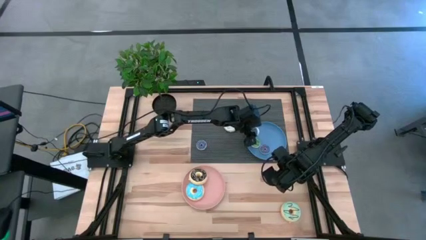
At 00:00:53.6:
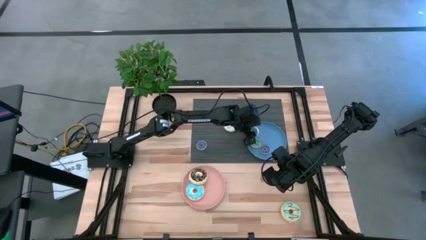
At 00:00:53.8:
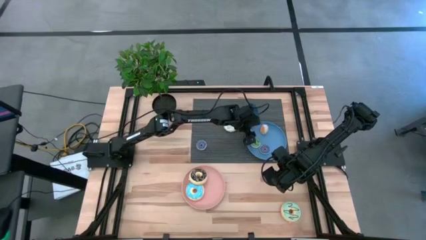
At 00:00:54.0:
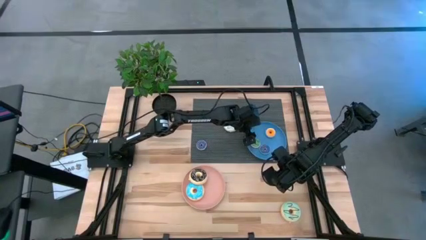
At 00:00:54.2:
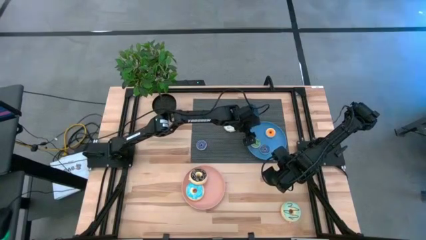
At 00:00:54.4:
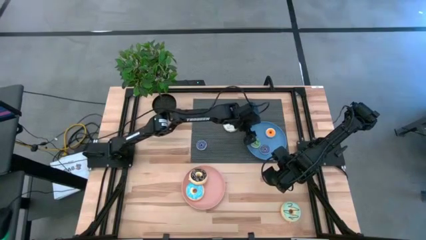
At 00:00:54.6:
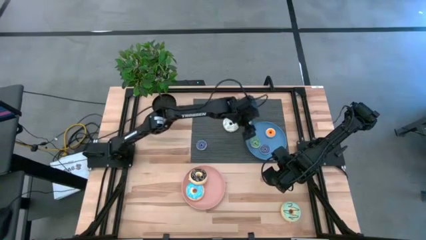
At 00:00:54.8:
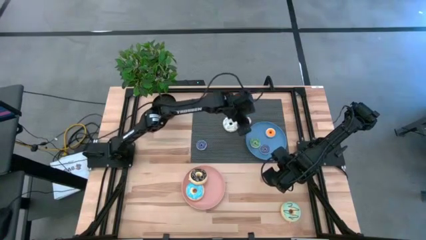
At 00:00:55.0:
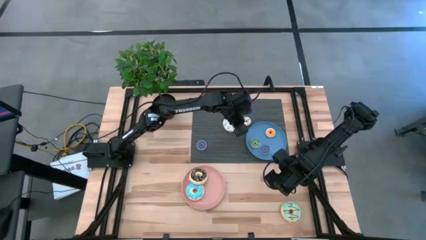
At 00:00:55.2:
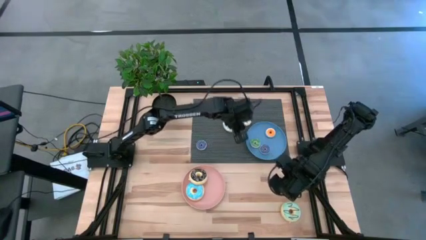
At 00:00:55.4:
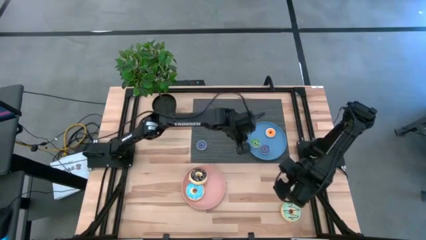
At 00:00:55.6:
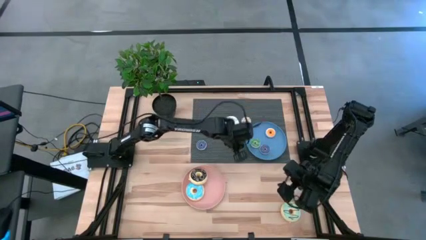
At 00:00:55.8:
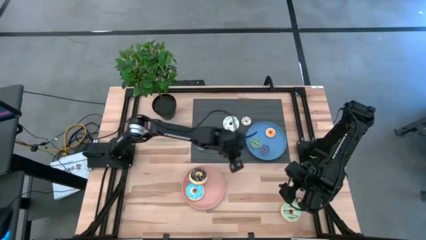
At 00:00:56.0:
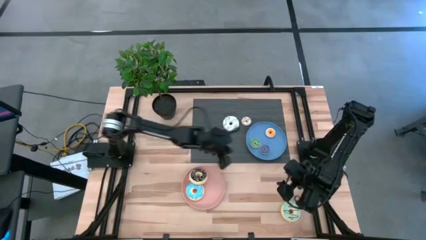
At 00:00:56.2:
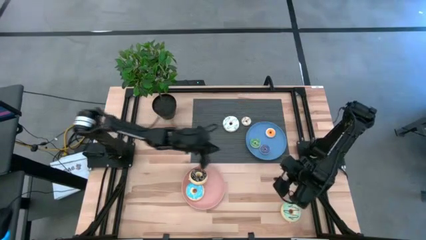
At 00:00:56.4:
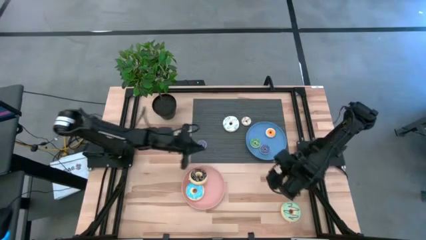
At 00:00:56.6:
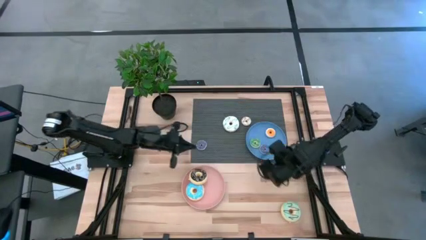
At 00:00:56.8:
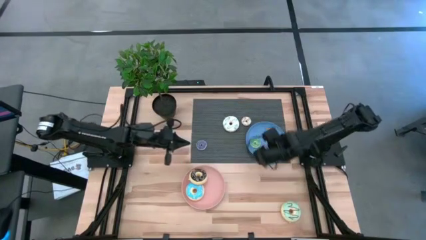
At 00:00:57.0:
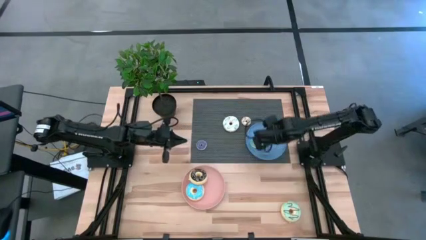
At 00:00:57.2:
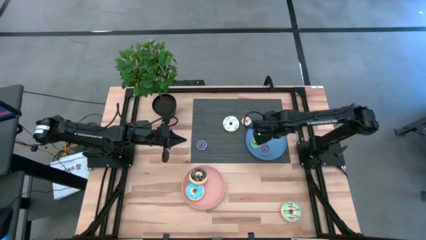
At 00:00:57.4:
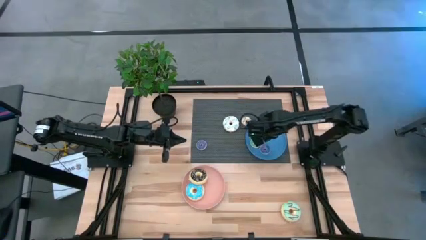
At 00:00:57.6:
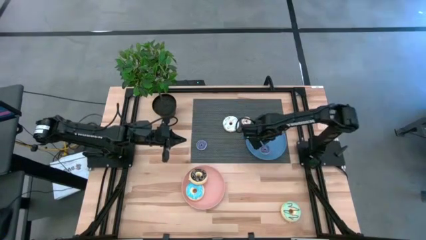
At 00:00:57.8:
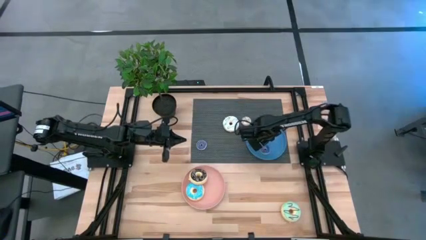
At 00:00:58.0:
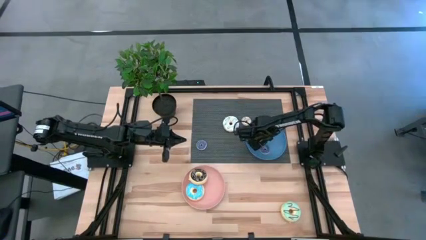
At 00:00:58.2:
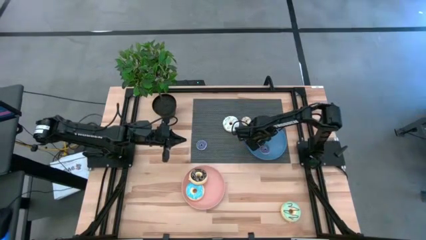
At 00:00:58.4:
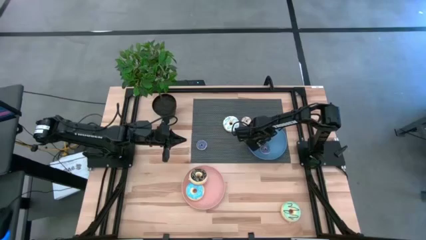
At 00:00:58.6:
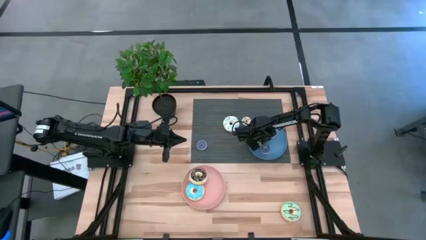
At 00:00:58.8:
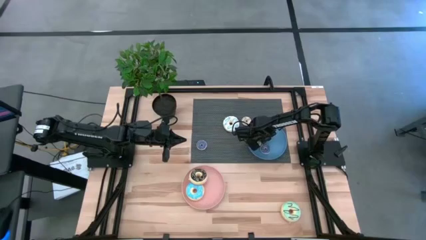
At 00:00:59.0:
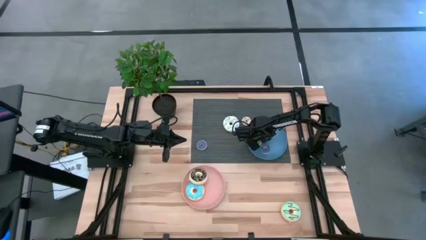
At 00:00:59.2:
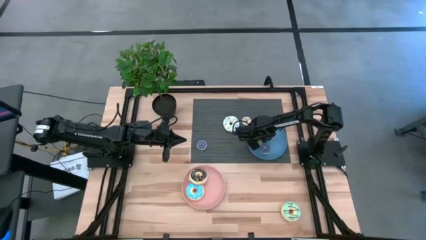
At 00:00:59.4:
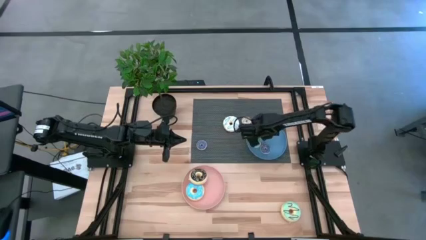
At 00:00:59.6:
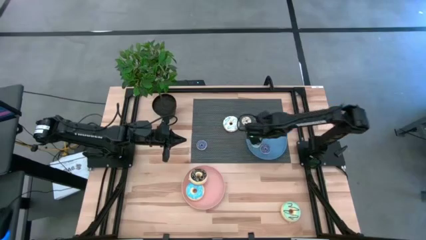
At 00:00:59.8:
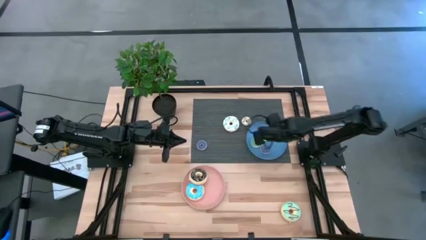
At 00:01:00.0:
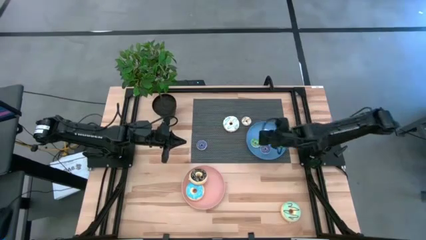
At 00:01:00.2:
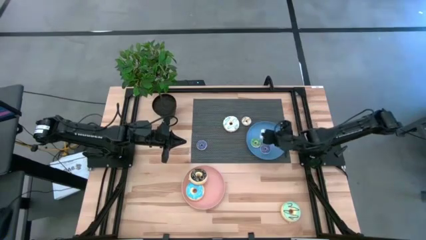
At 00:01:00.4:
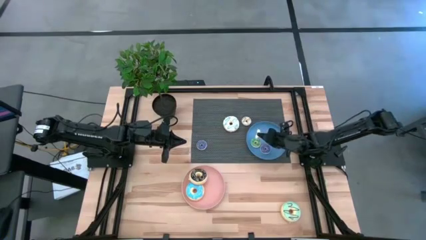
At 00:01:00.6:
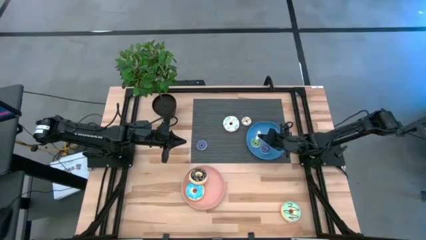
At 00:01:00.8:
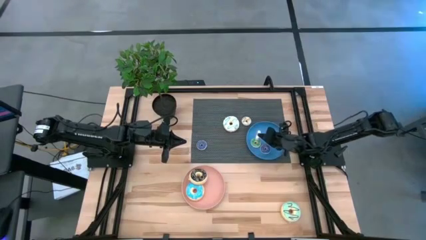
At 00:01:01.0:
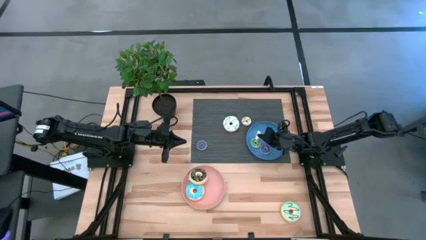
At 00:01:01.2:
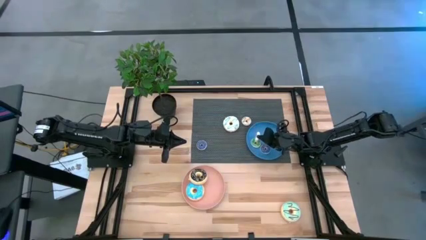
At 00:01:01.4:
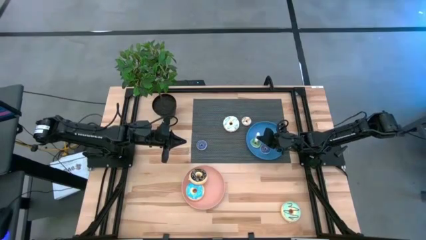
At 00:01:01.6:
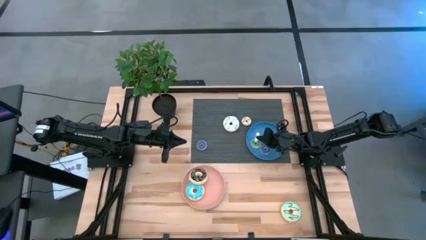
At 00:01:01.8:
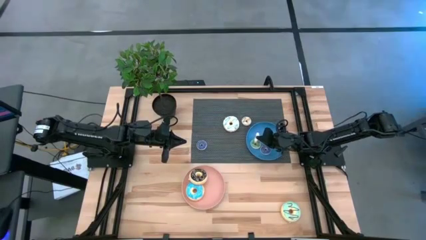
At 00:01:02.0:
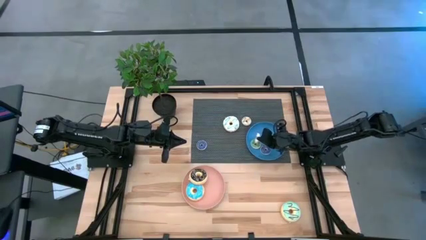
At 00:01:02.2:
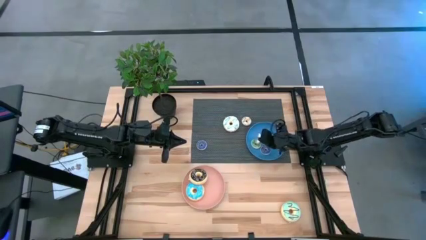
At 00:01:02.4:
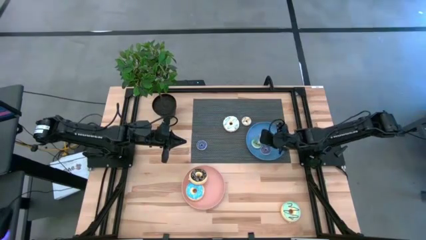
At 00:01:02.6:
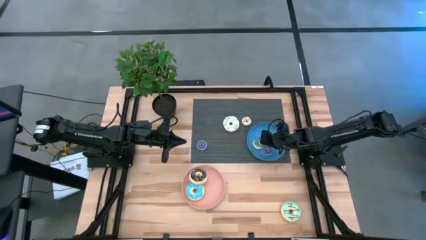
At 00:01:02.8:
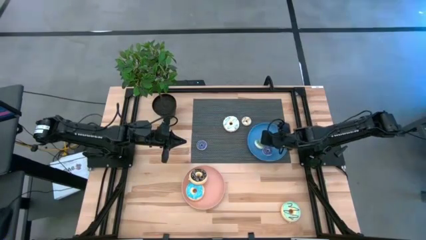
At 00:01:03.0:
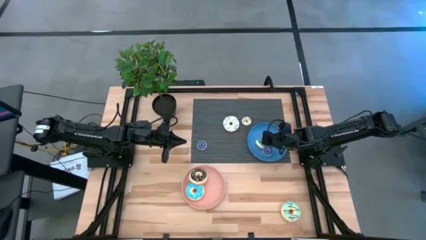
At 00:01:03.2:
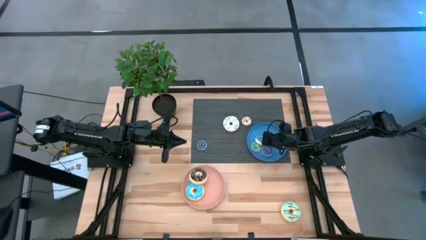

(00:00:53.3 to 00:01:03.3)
Task: Pick & Place donuts
Put the small blue donut onto the blue plate
